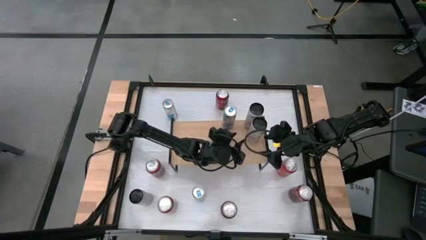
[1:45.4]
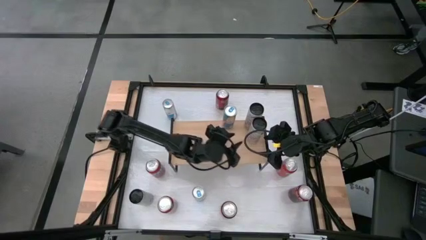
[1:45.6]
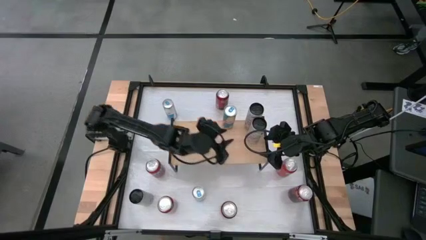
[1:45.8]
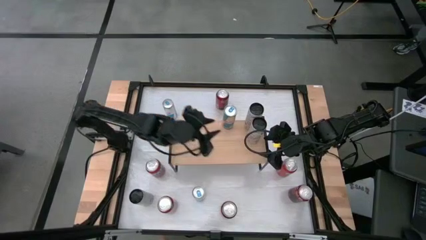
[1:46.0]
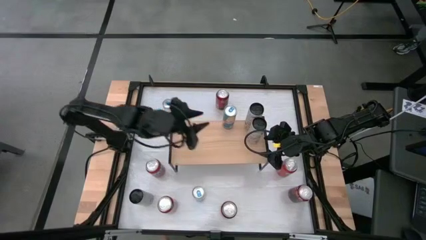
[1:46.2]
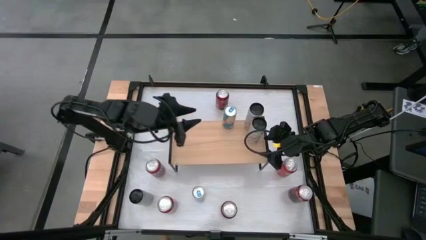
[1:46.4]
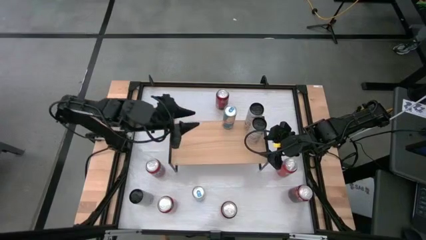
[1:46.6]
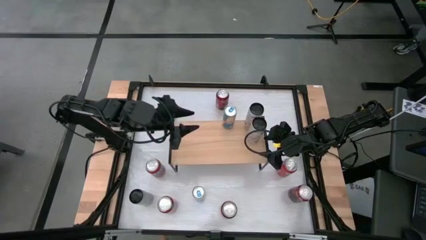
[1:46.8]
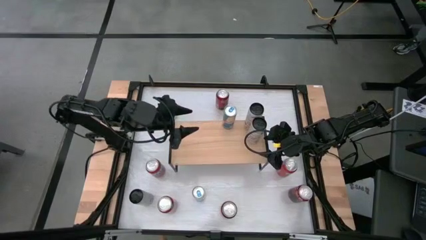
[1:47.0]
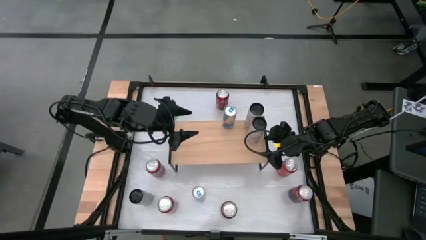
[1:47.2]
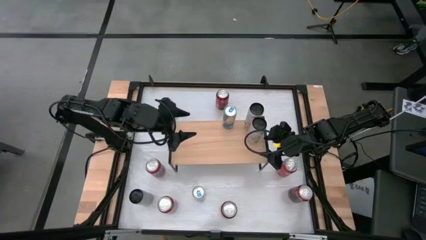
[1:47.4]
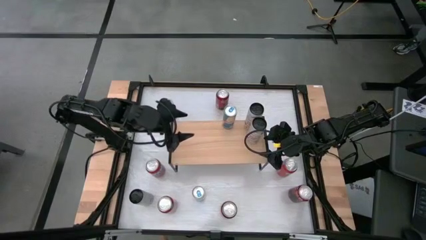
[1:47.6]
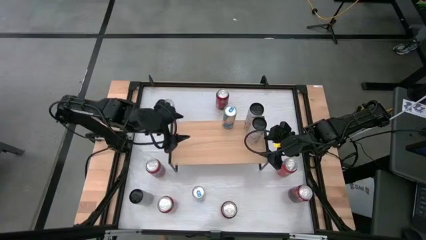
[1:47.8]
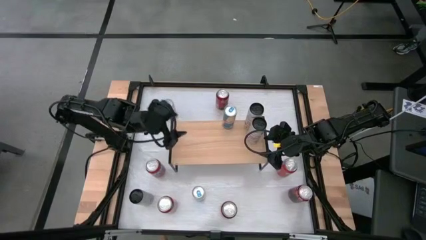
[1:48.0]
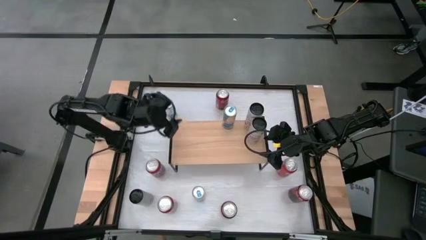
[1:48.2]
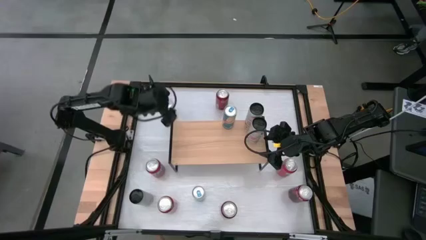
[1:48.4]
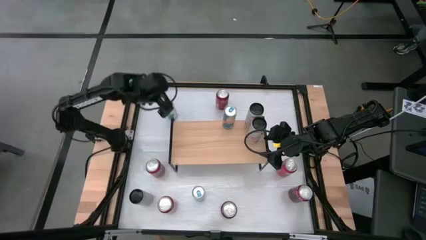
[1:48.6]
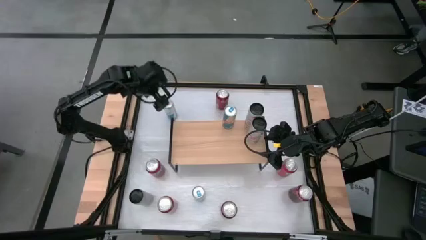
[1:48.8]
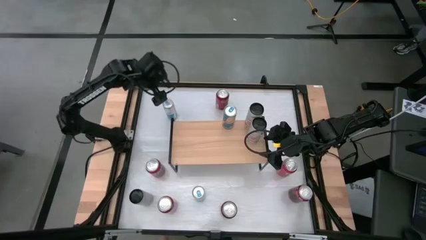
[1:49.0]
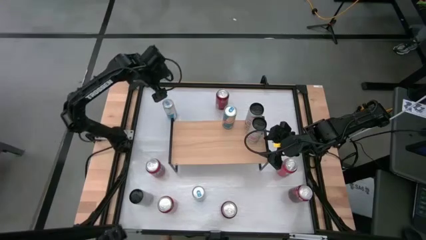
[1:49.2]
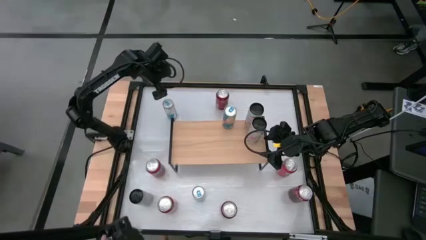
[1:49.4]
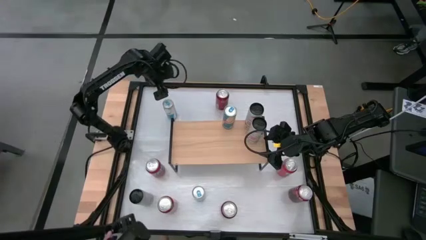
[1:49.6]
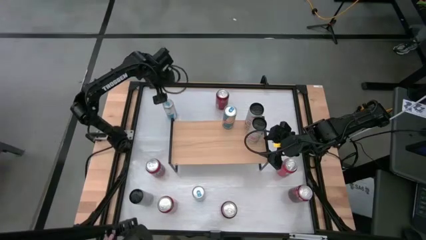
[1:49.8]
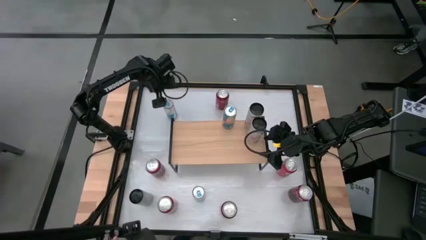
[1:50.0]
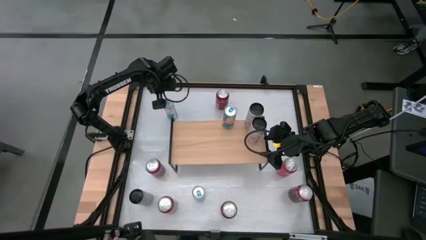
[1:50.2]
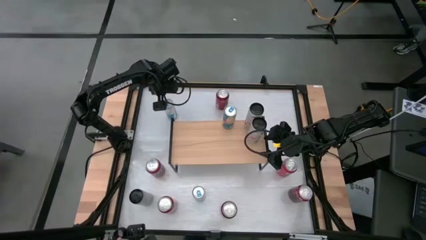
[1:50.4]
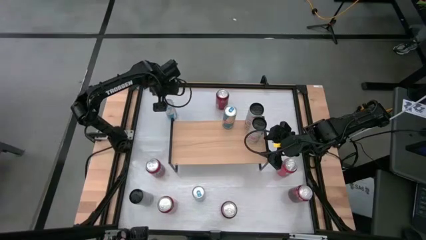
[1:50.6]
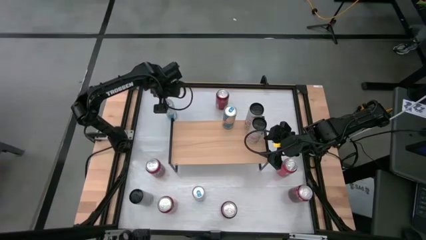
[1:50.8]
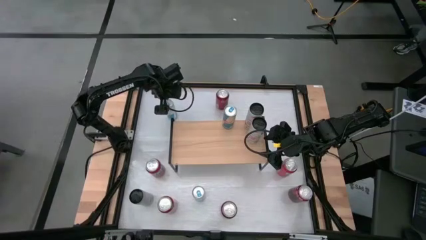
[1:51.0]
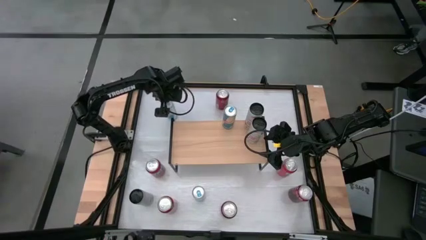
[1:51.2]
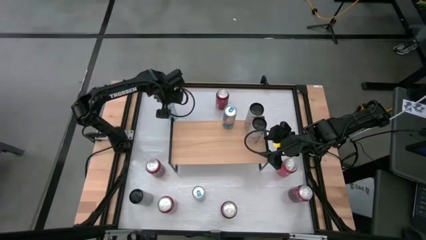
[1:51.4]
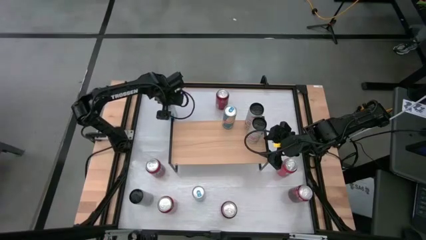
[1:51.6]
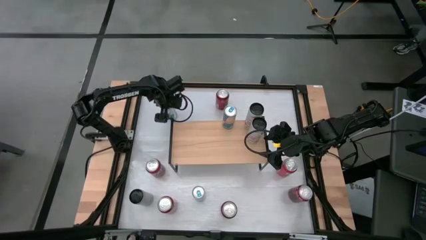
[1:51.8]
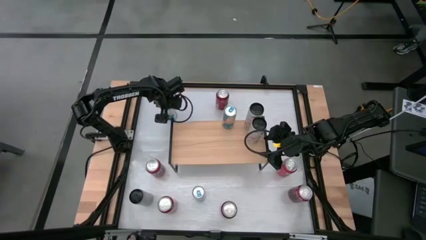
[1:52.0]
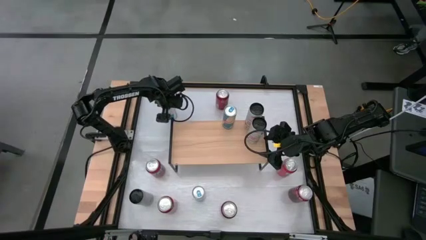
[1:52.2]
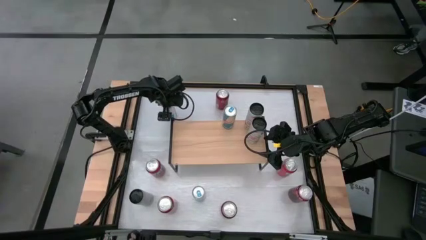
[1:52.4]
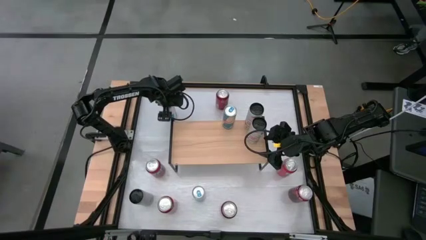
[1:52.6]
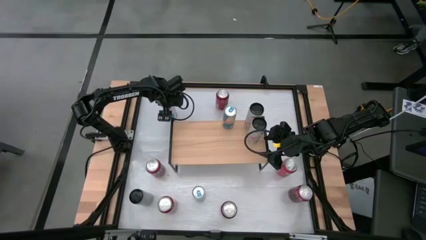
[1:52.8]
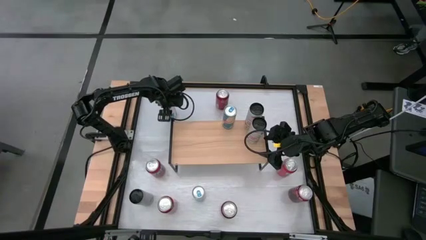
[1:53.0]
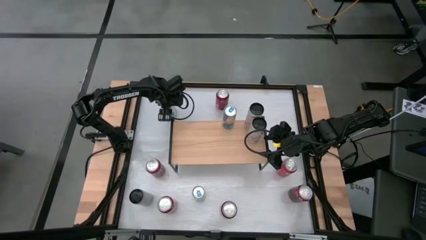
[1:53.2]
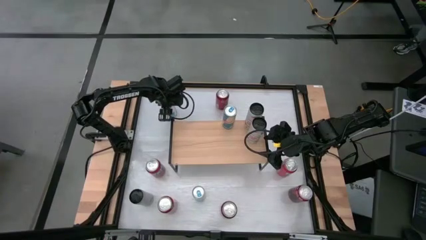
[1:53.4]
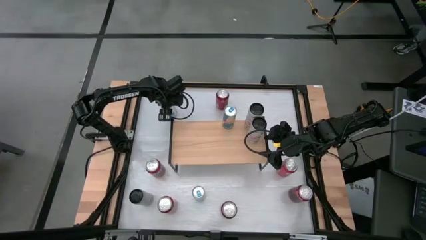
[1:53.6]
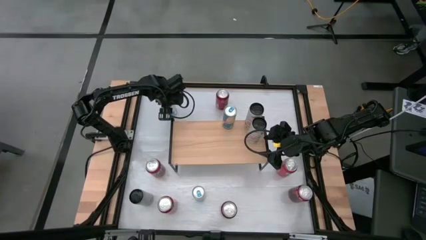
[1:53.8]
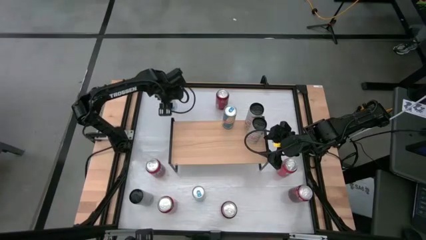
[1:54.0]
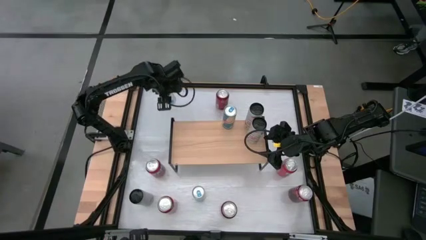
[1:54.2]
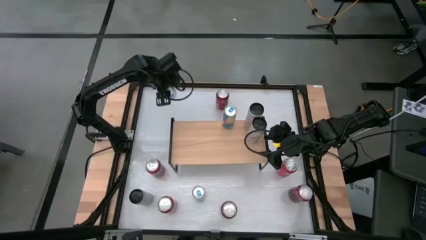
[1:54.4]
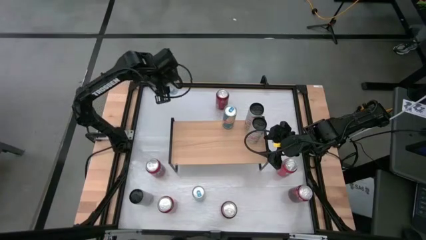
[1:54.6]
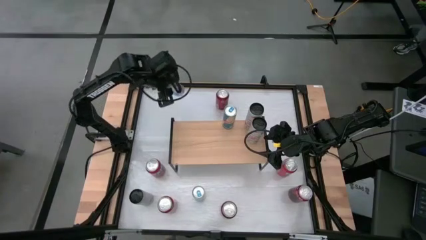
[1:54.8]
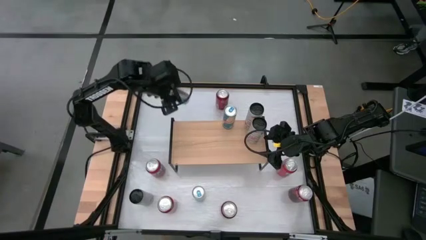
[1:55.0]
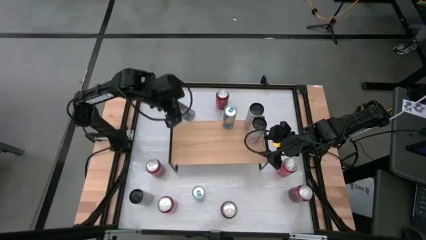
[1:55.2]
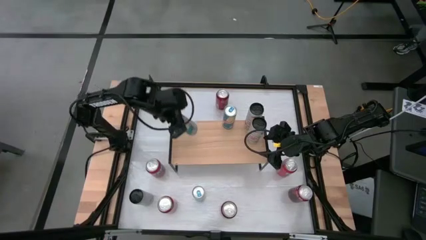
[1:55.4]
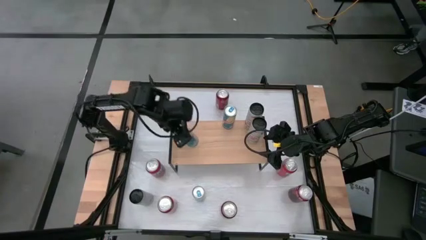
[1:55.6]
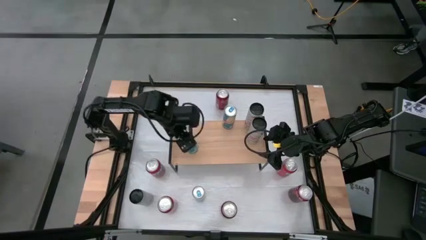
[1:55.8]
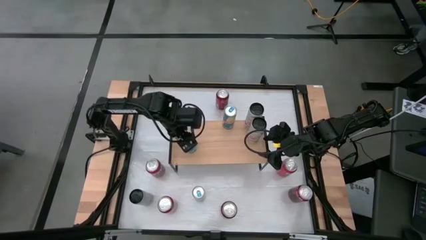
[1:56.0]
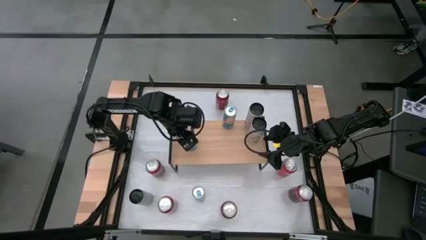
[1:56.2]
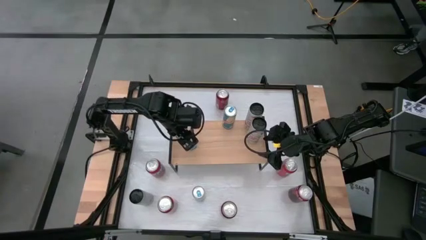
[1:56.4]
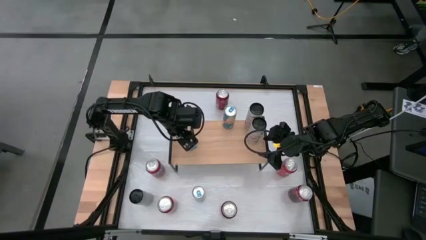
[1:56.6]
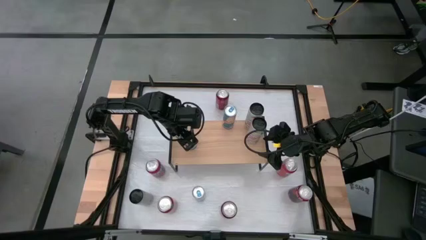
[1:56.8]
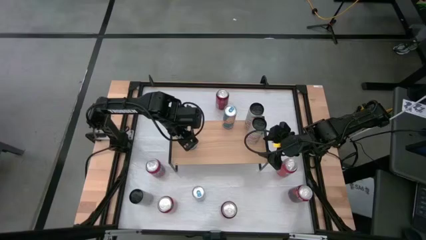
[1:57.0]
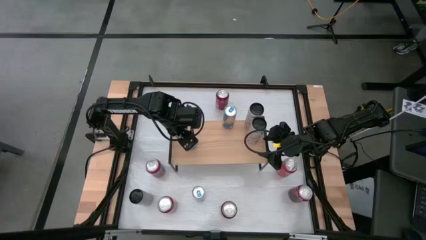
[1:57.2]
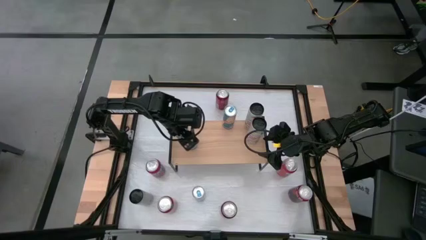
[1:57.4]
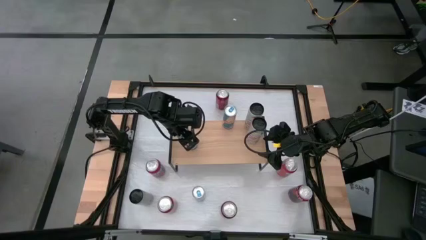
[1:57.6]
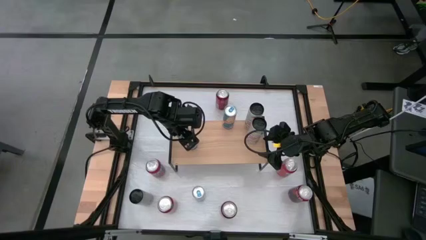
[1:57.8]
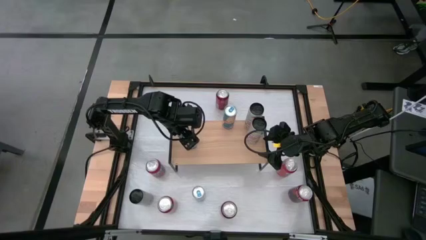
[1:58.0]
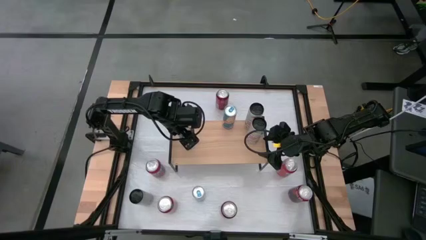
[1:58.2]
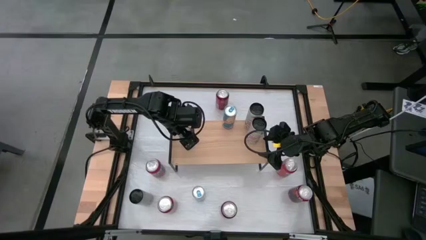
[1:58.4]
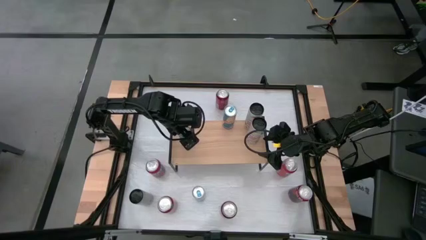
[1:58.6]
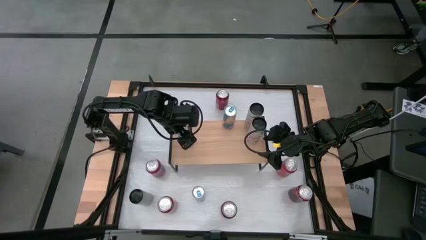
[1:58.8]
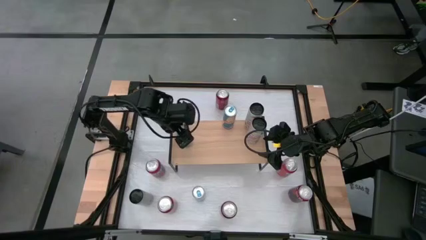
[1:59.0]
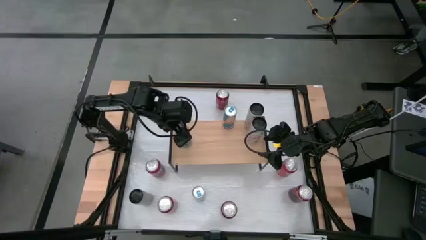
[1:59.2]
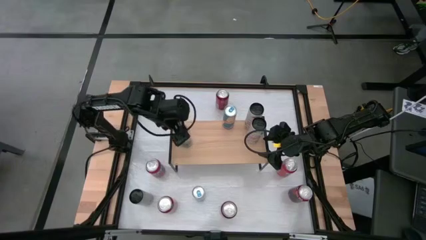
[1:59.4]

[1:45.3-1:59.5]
Task: Place canned beverage on shelf
Put the top blue soda can on the shelf

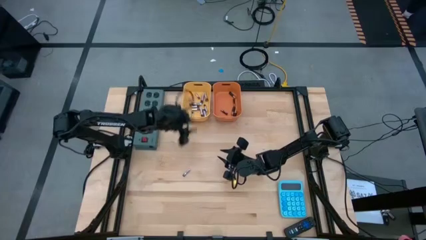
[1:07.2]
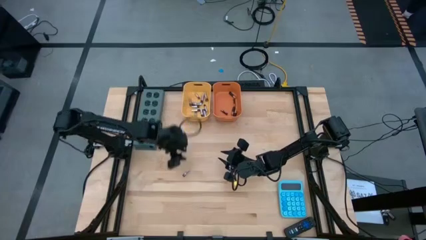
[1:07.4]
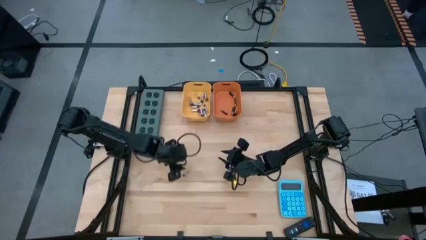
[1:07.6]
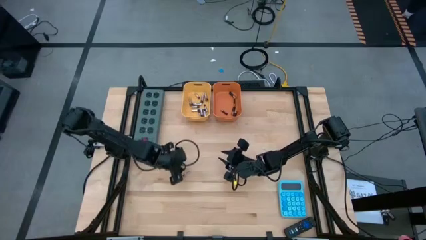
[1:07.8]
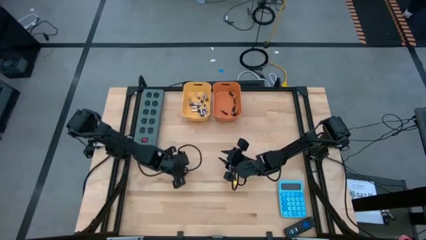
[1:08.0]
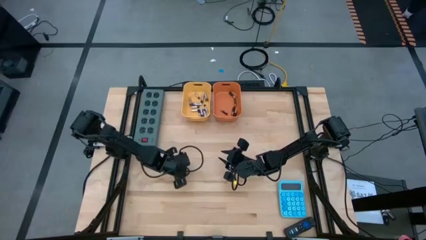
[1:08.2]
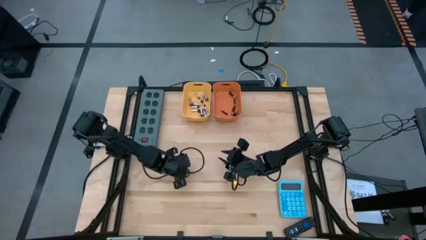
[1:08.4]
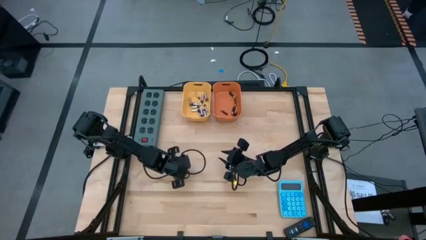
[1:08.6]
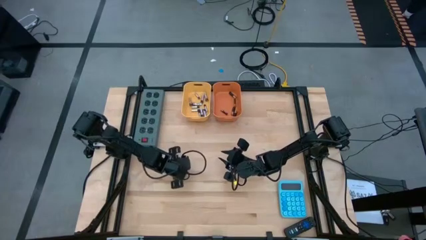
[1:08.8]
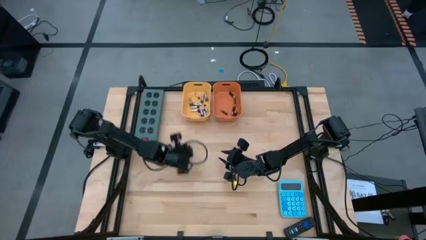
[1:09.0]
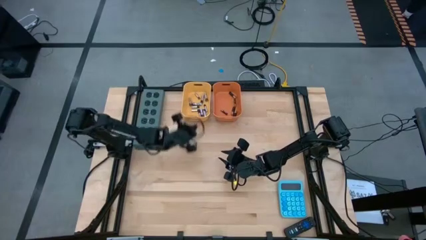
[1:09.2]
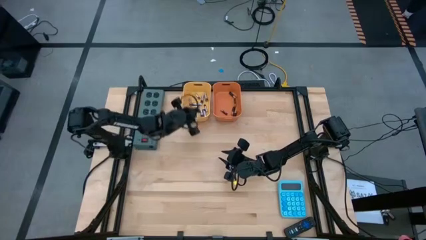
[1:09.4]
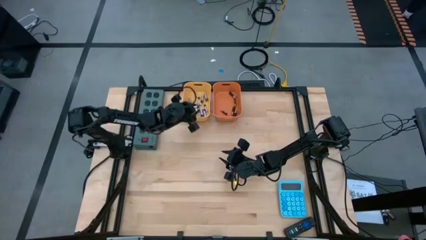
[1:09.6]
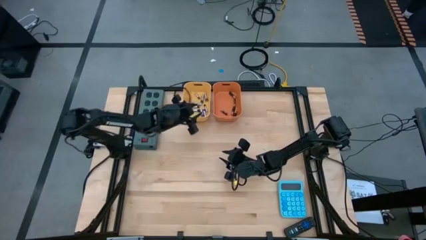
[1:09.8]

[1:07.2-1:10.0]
Task: Sort batteries
Put the silver battery into the yellow bin
